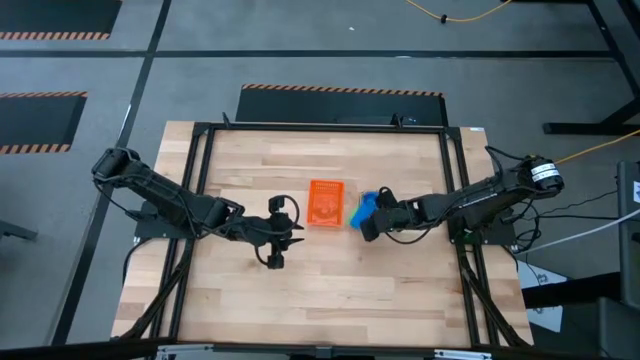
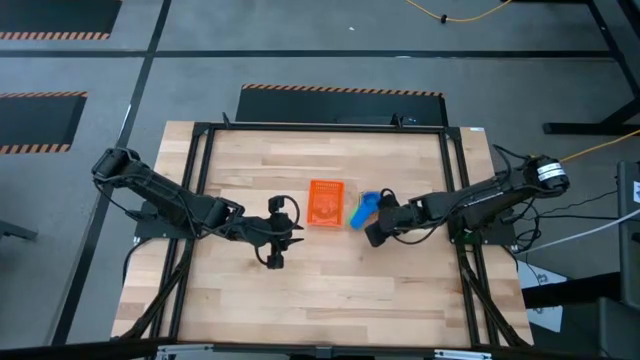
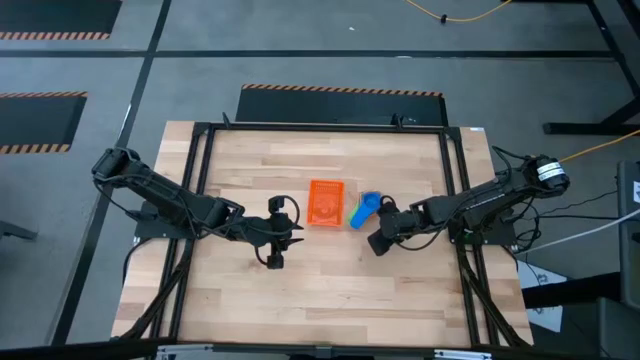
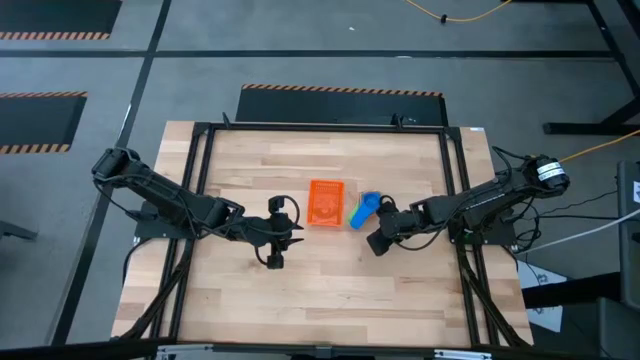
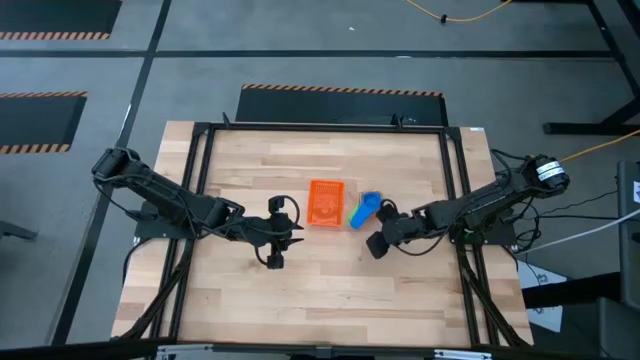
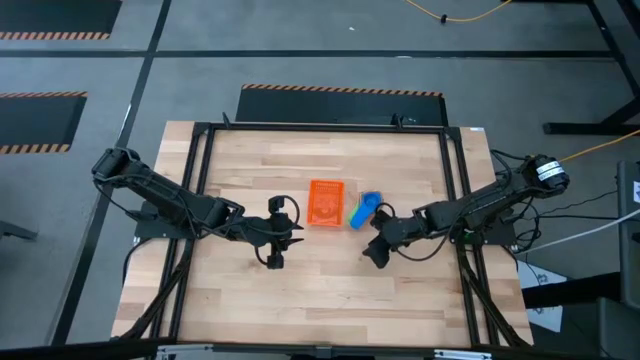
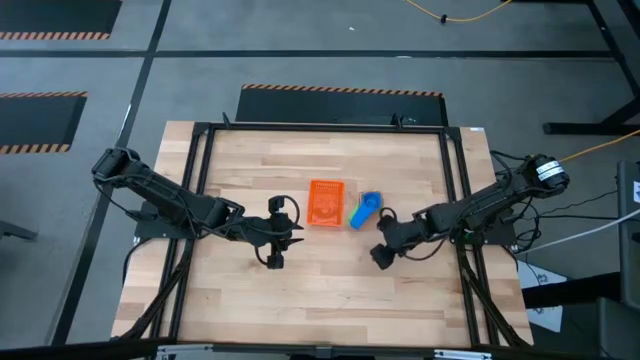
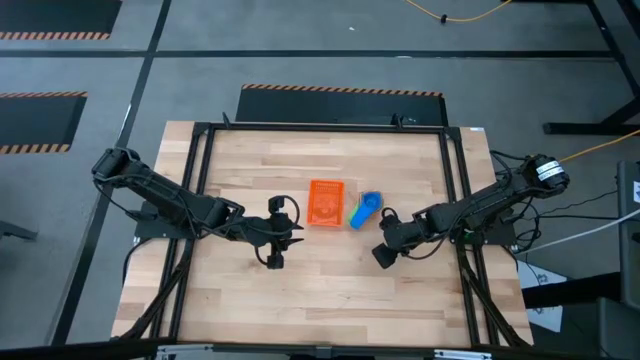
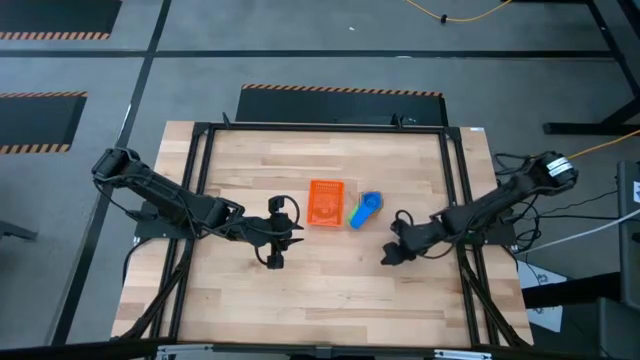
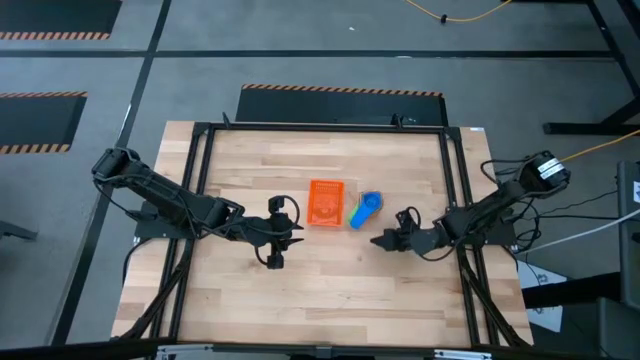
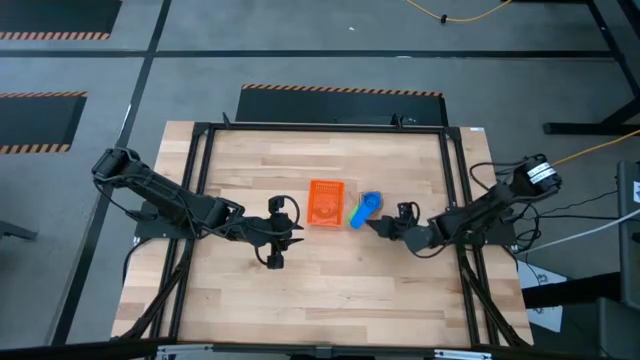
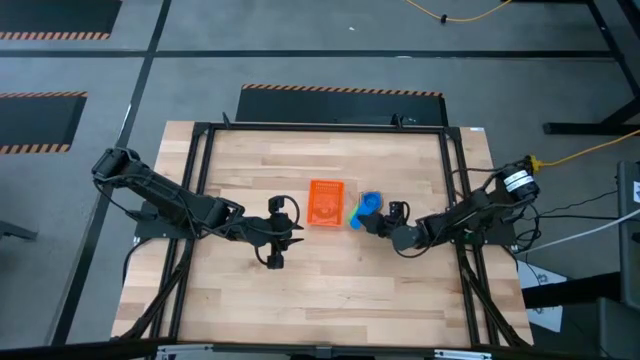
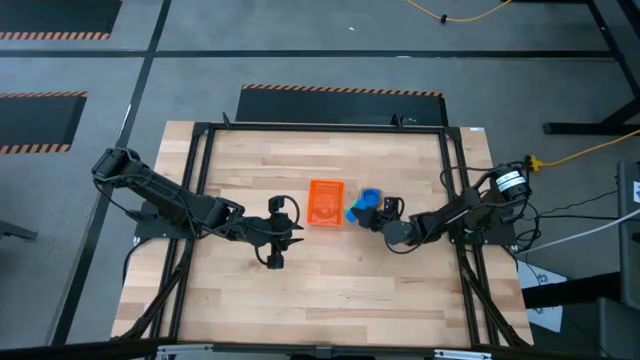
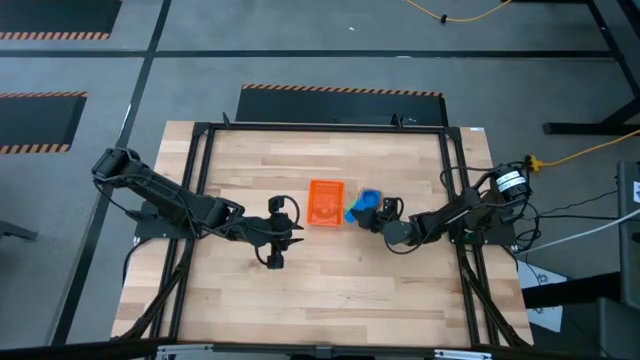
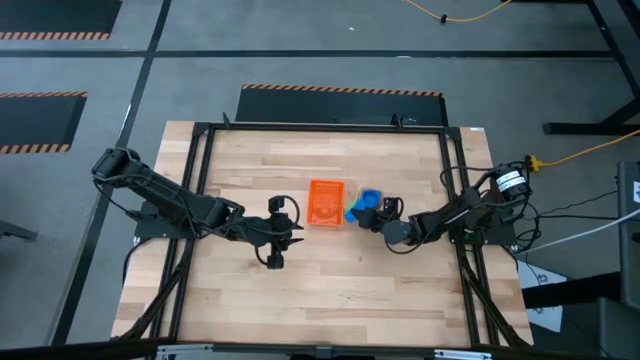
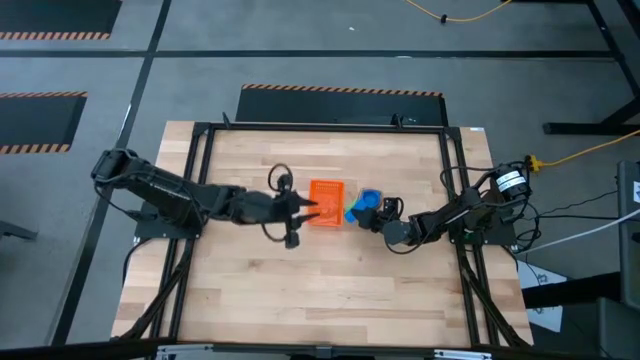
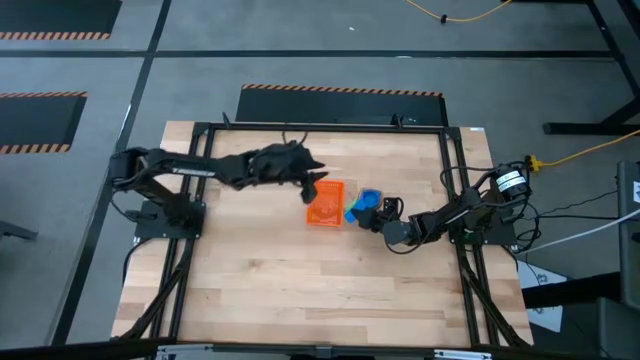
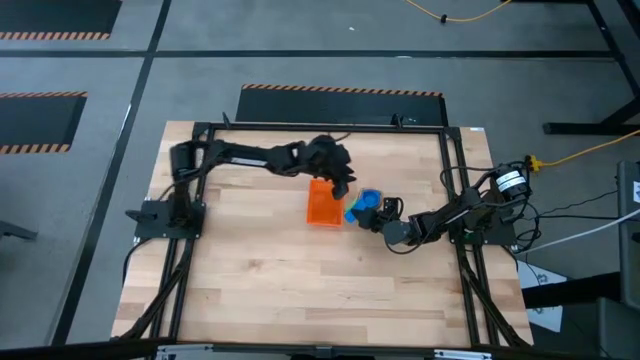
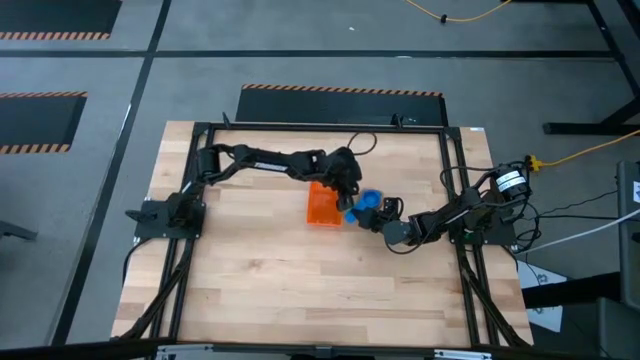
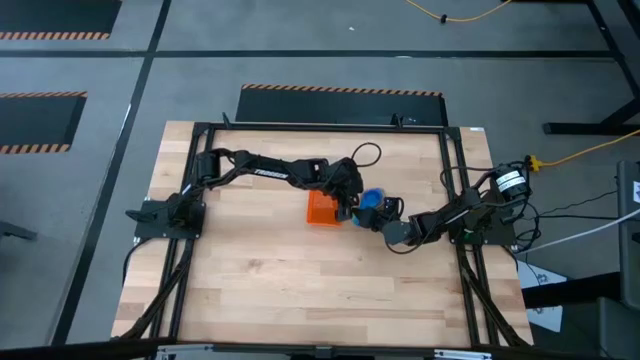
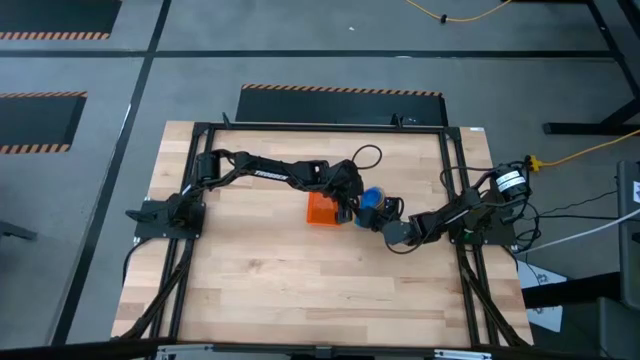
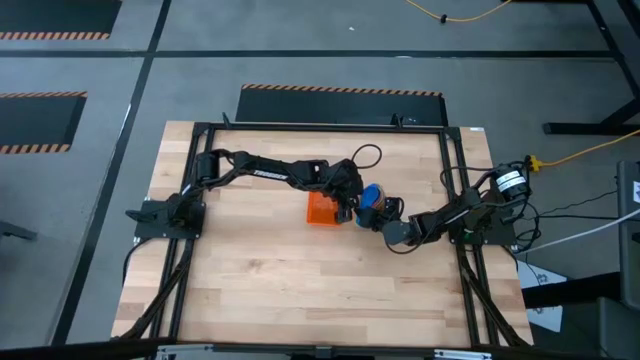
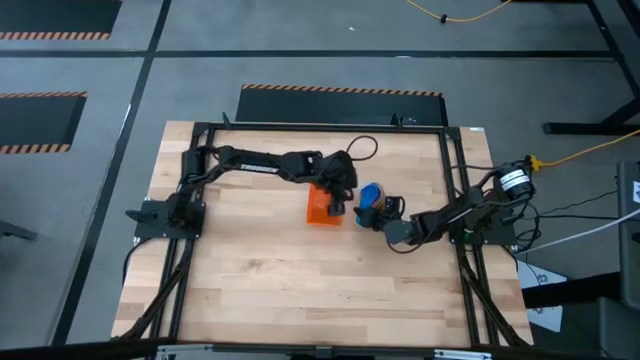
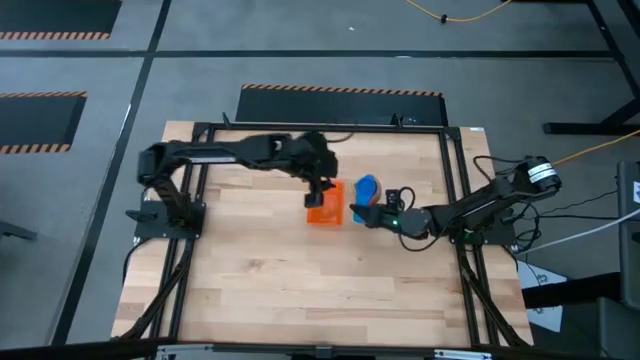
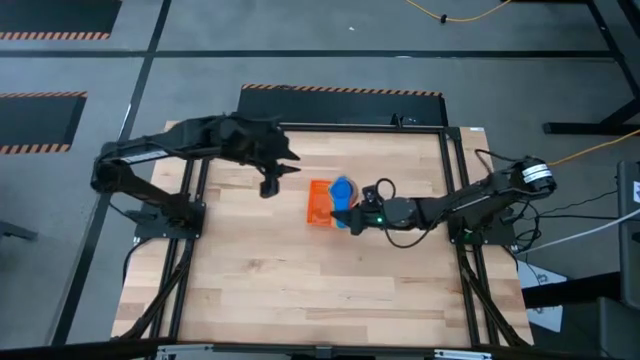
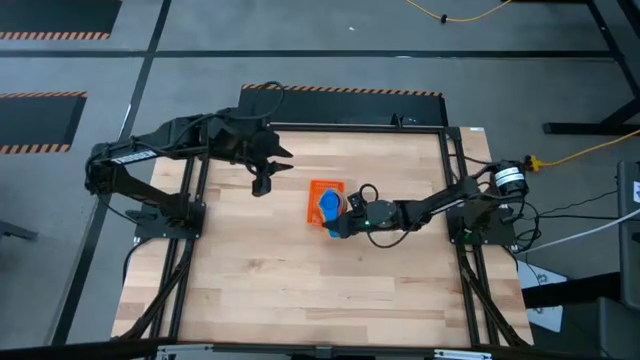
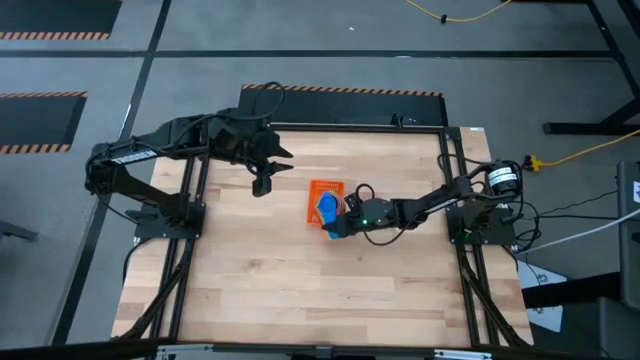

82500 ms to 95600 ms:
Task: Nest measuring cups in basket
Put the nested measuring cups into the orange bin

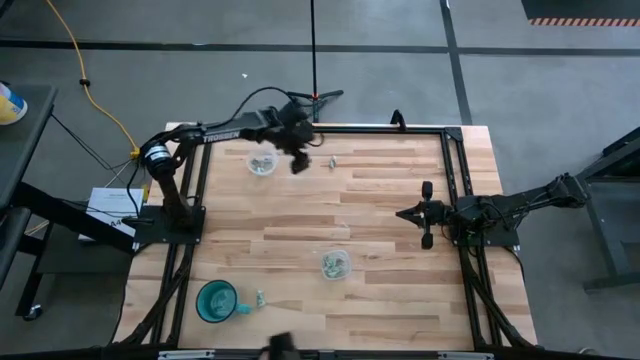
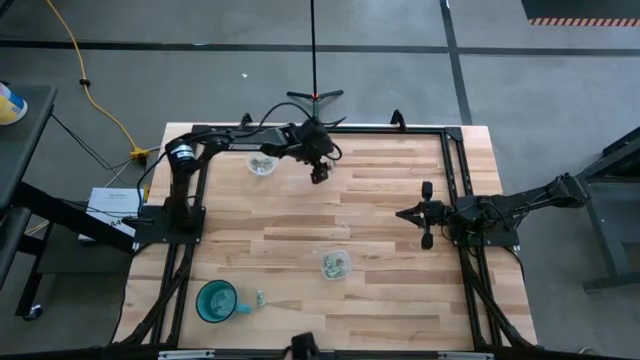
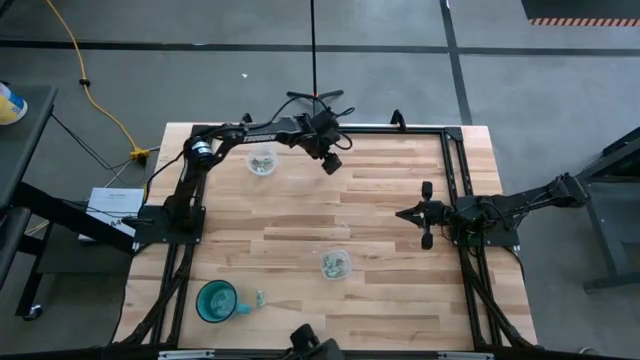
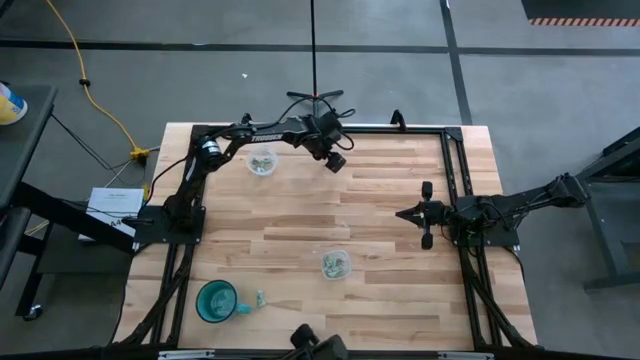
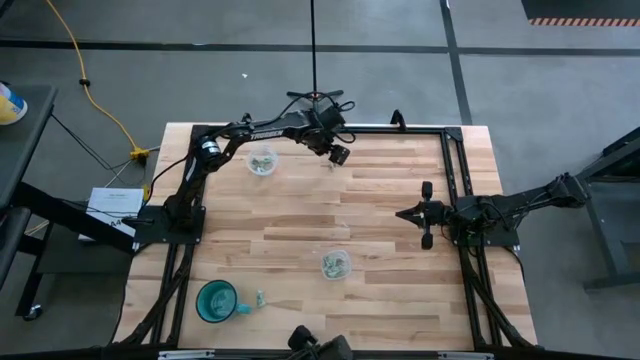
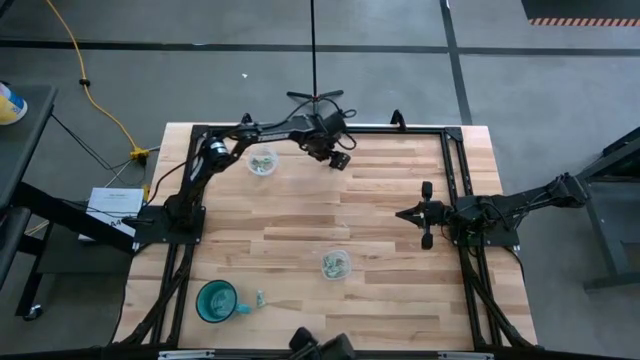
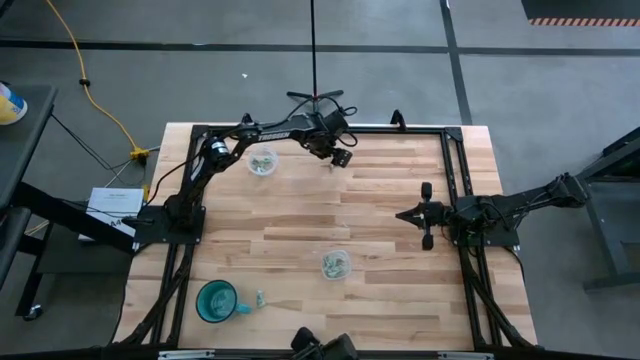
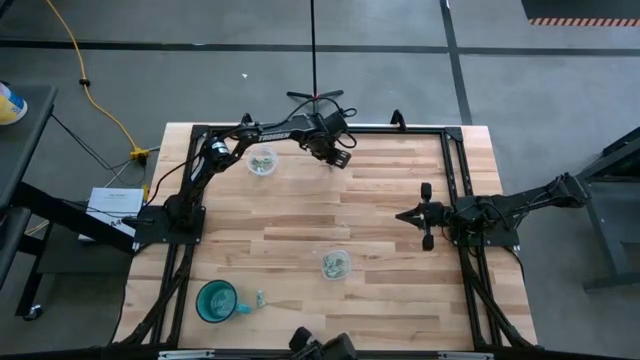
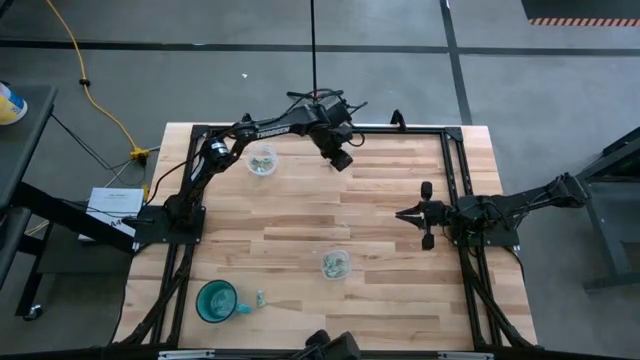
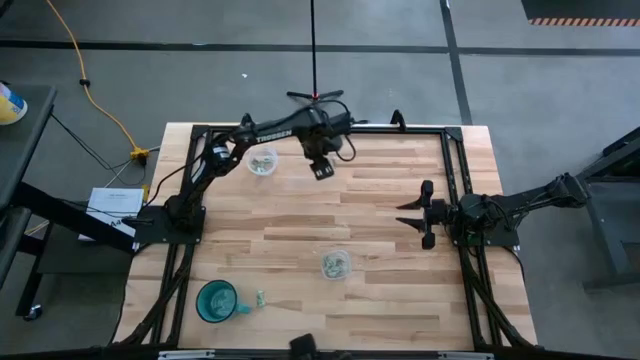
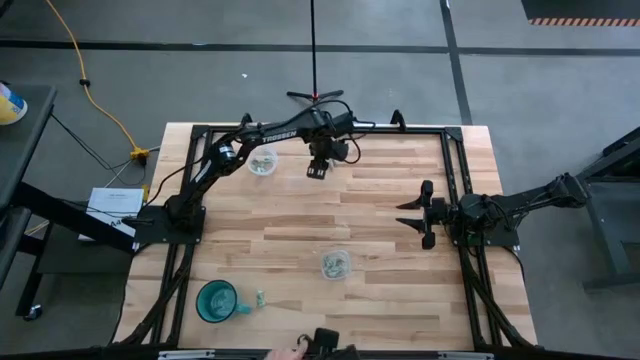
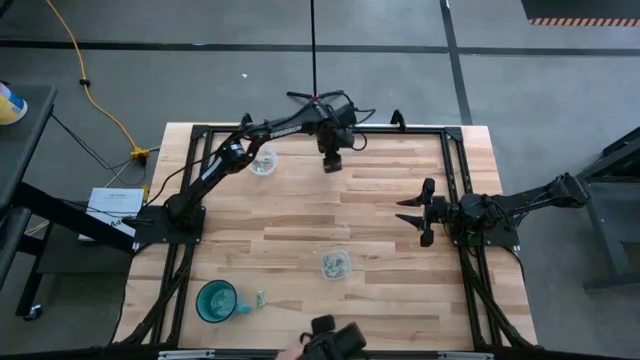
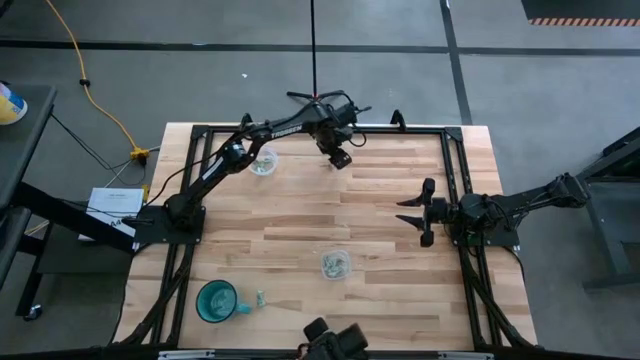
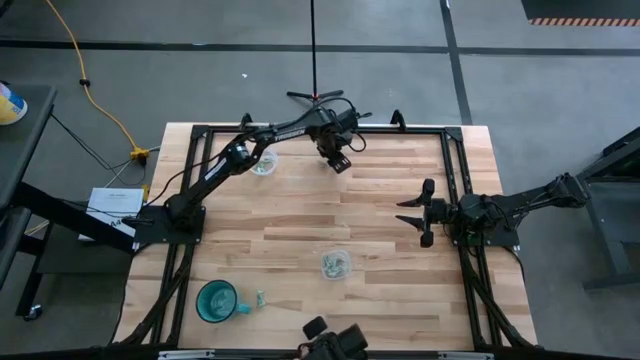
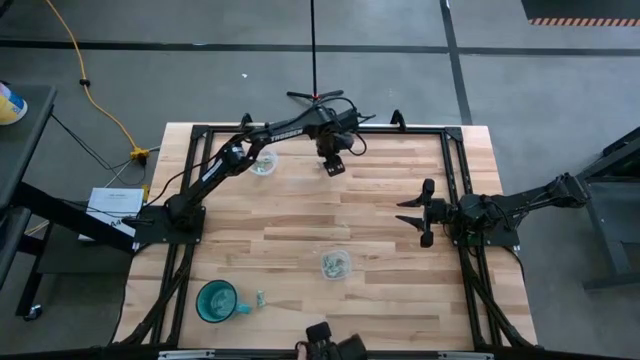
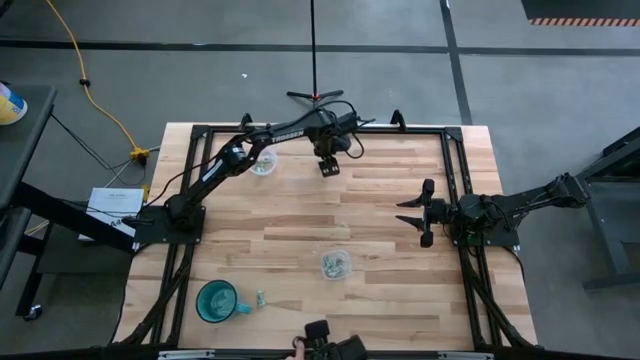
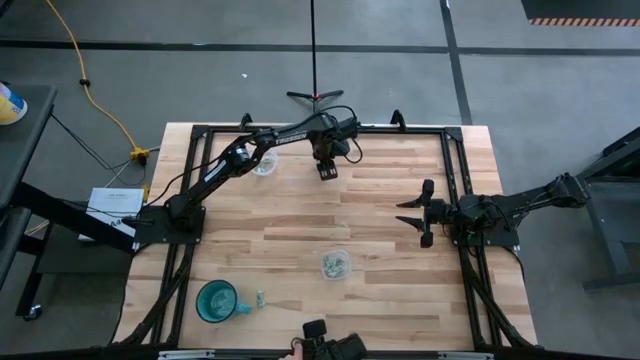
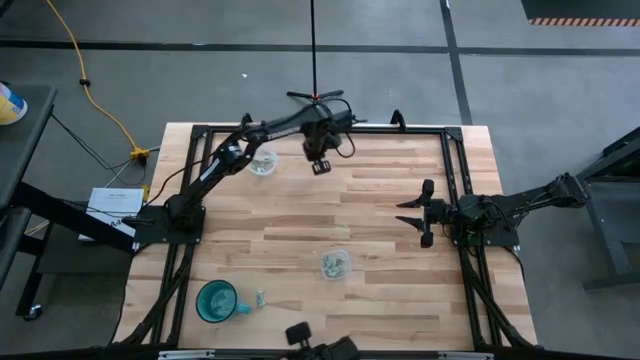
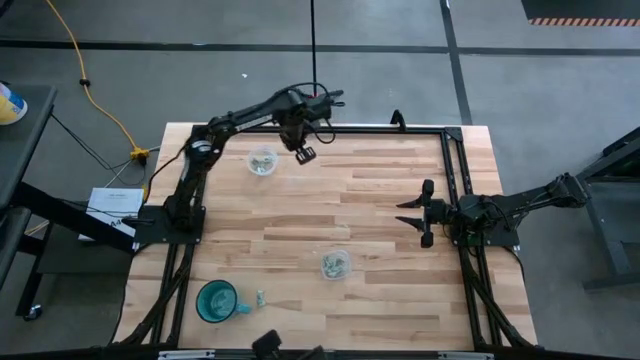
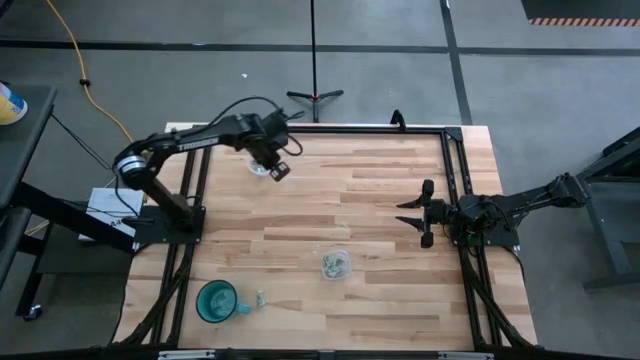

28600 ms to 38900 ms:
Task: Pick and place Stevia / Truvia into bins
Put the stevia packet into the bottom transparent container
